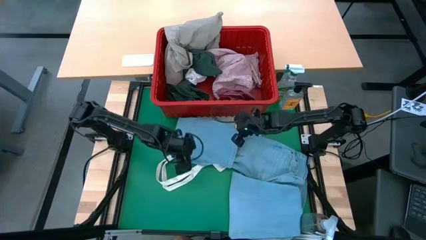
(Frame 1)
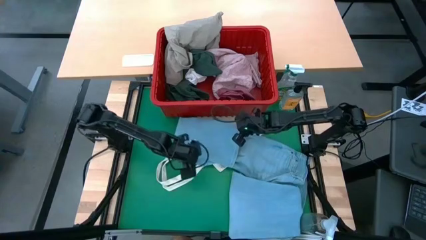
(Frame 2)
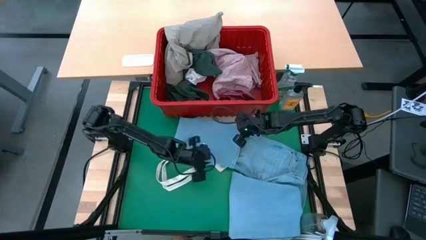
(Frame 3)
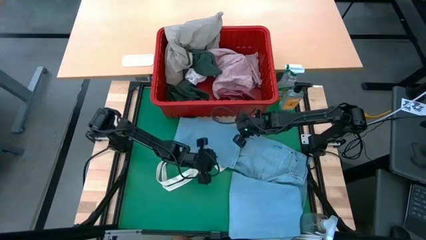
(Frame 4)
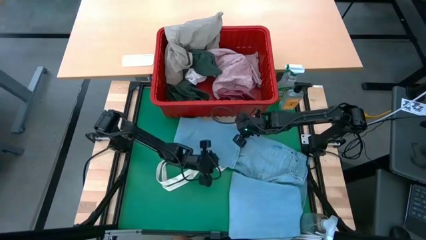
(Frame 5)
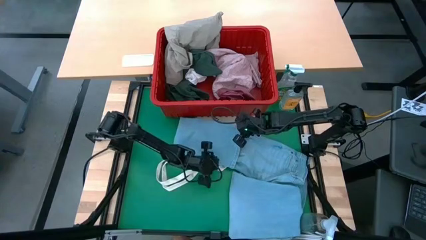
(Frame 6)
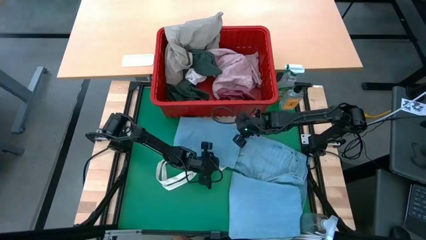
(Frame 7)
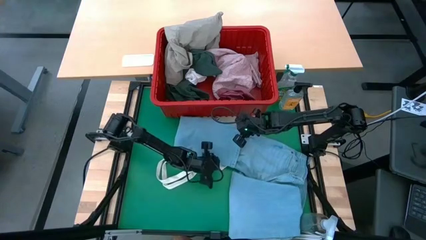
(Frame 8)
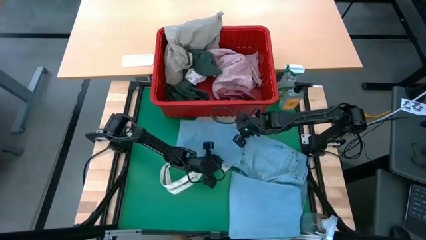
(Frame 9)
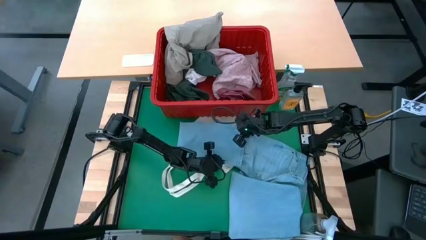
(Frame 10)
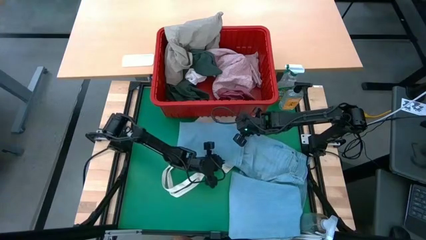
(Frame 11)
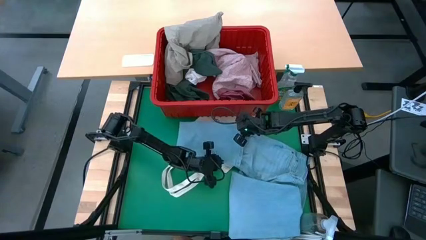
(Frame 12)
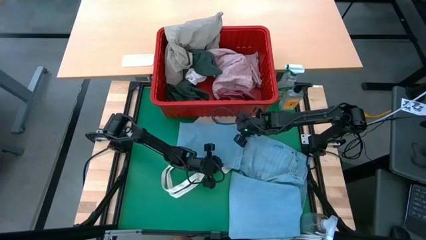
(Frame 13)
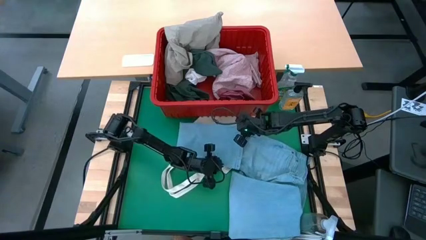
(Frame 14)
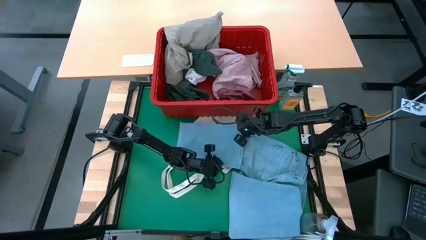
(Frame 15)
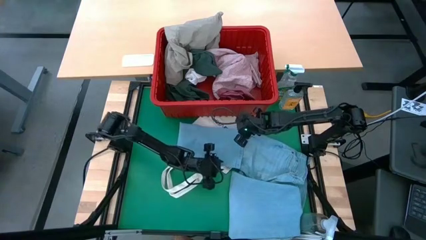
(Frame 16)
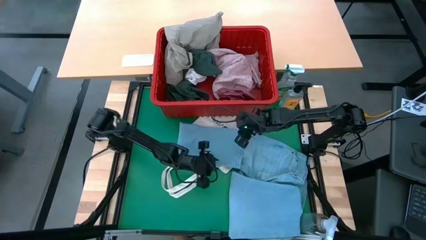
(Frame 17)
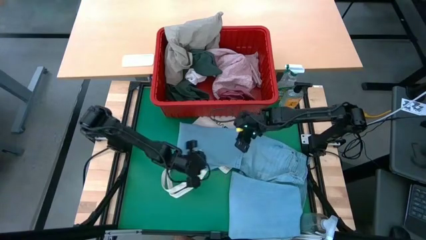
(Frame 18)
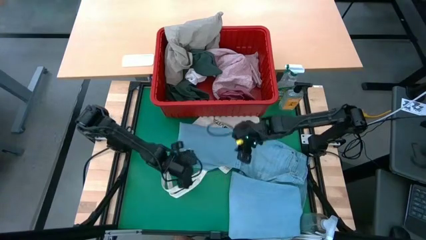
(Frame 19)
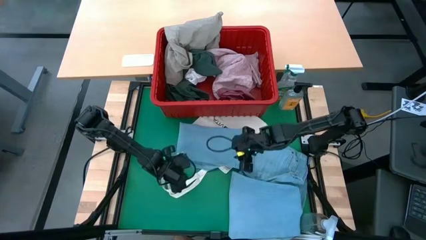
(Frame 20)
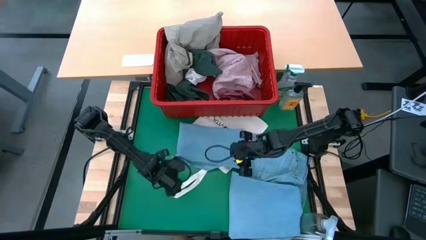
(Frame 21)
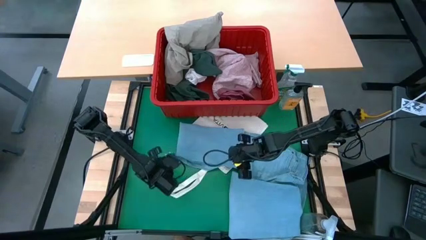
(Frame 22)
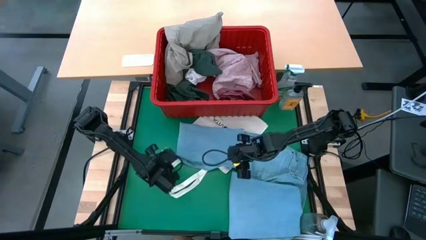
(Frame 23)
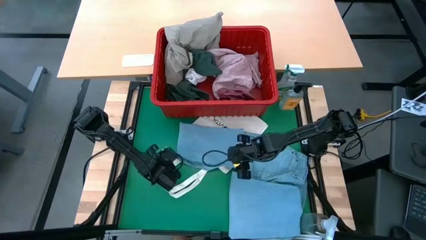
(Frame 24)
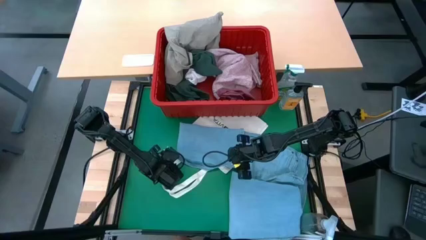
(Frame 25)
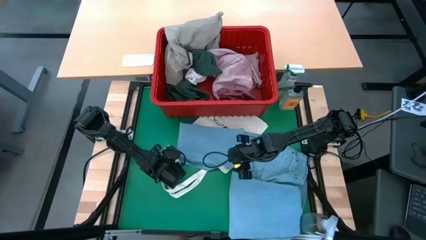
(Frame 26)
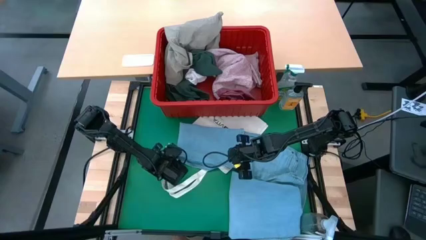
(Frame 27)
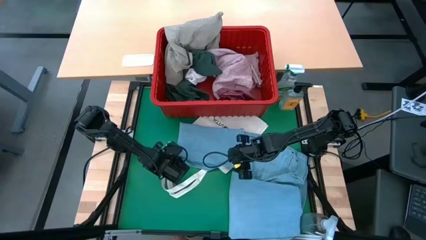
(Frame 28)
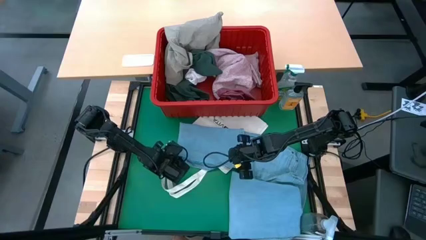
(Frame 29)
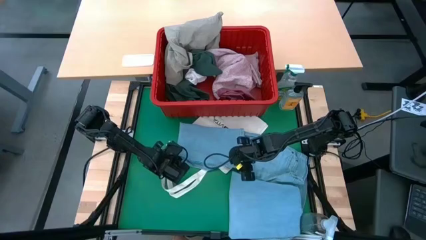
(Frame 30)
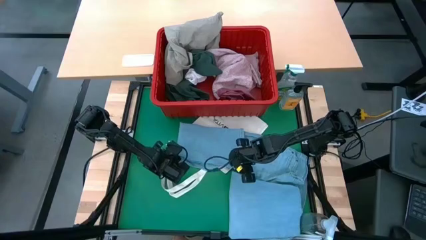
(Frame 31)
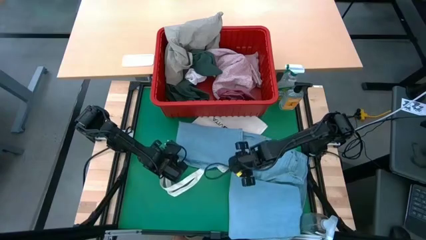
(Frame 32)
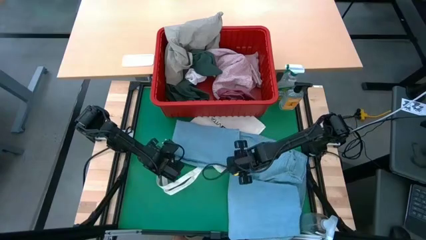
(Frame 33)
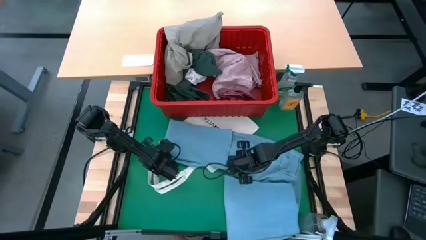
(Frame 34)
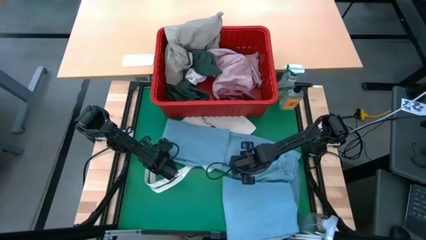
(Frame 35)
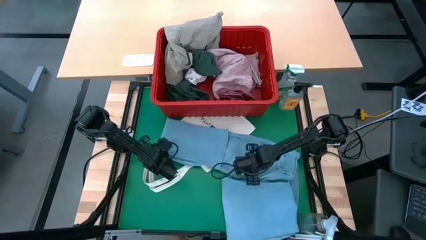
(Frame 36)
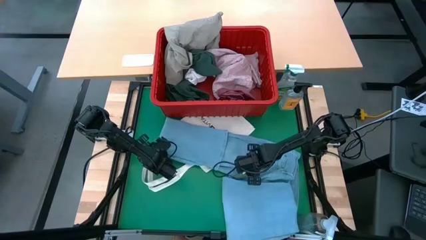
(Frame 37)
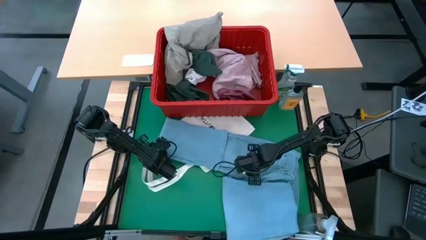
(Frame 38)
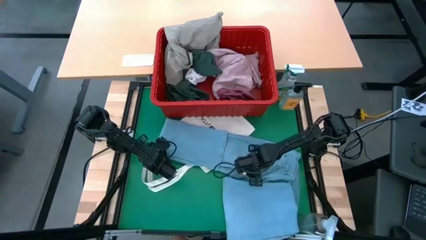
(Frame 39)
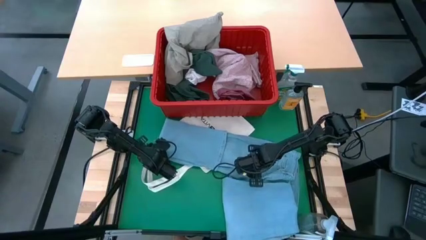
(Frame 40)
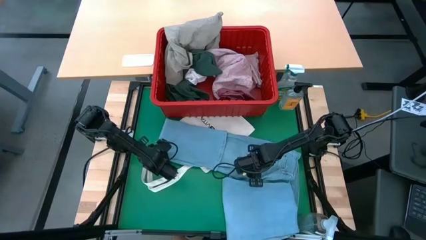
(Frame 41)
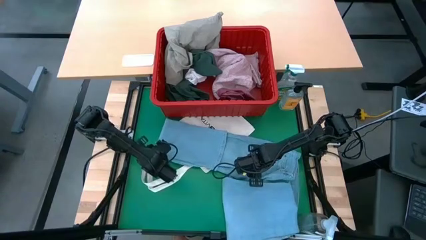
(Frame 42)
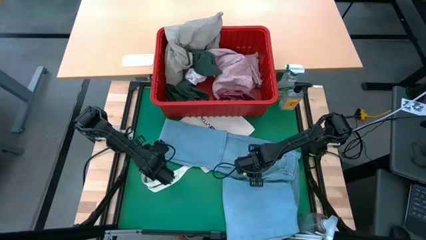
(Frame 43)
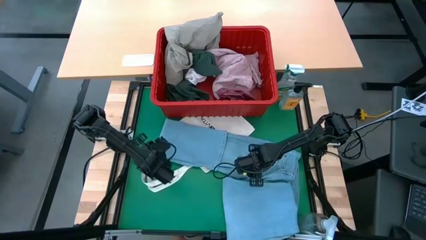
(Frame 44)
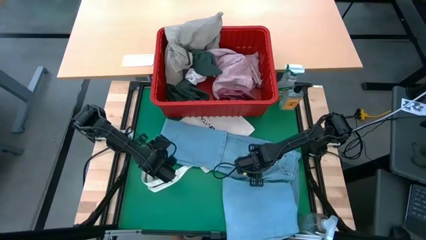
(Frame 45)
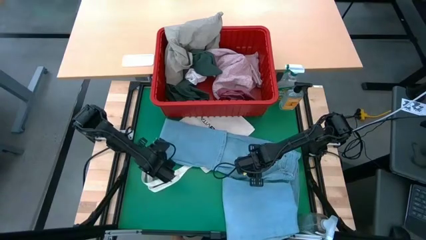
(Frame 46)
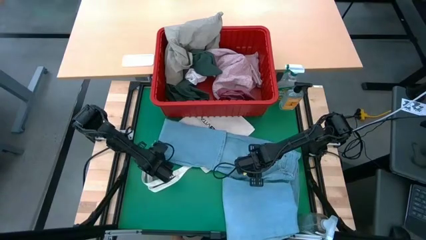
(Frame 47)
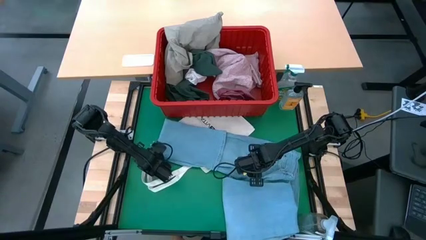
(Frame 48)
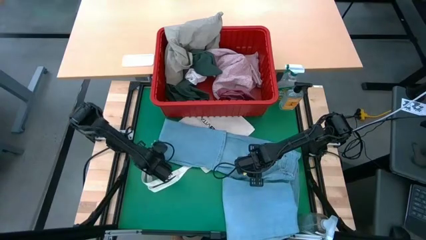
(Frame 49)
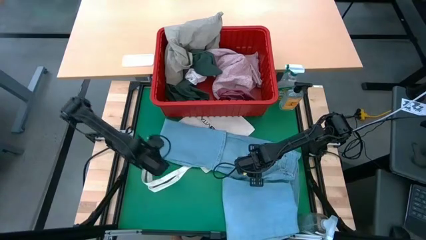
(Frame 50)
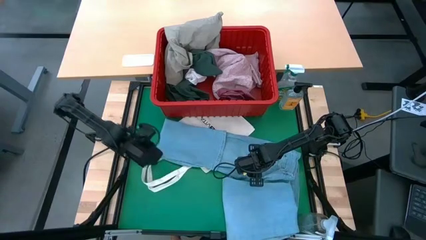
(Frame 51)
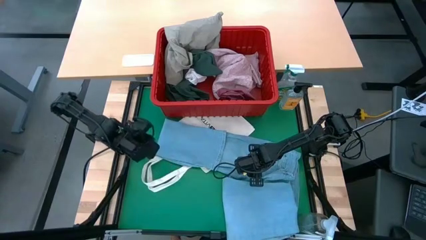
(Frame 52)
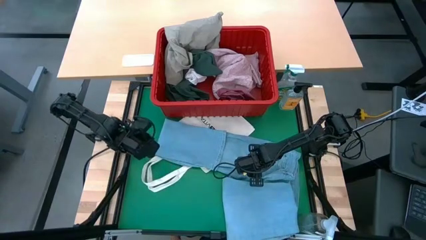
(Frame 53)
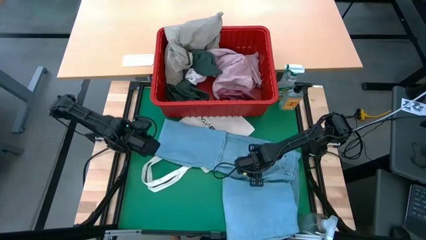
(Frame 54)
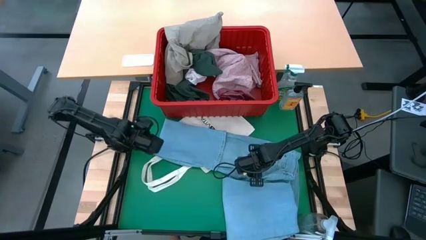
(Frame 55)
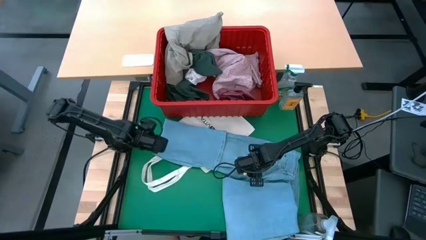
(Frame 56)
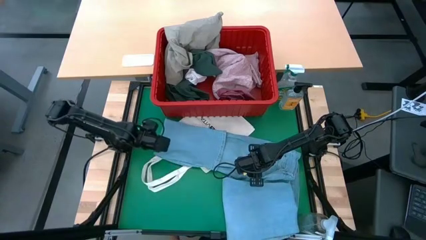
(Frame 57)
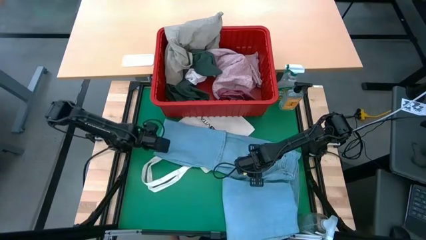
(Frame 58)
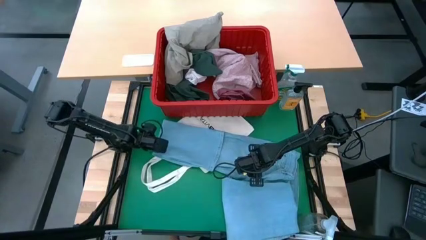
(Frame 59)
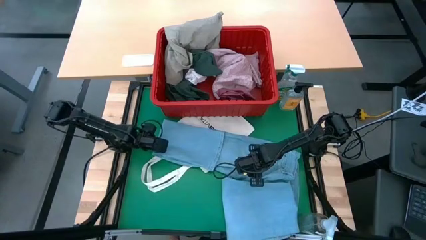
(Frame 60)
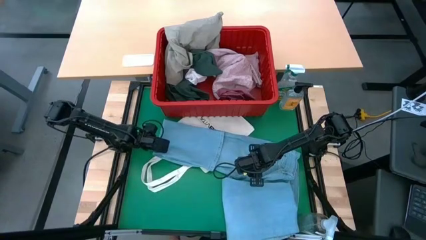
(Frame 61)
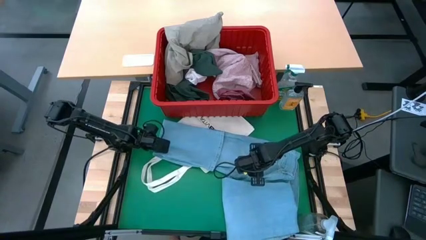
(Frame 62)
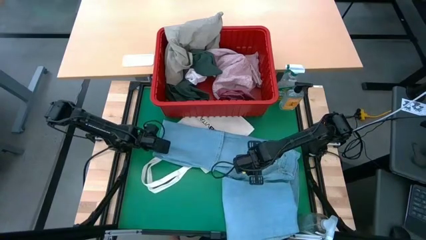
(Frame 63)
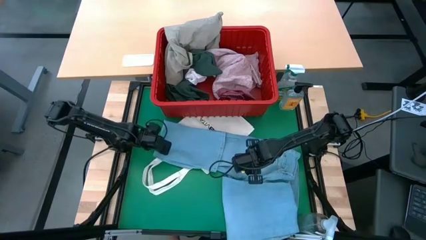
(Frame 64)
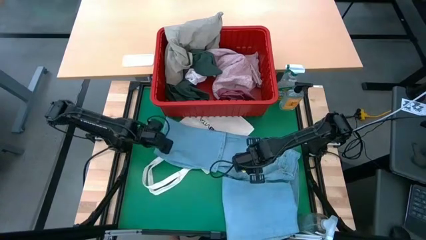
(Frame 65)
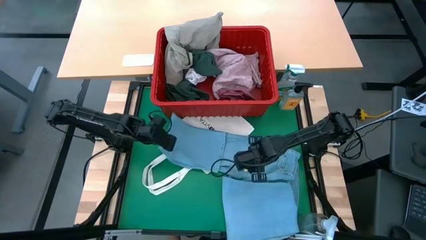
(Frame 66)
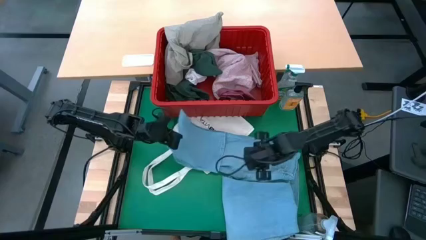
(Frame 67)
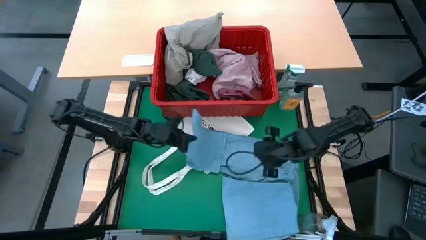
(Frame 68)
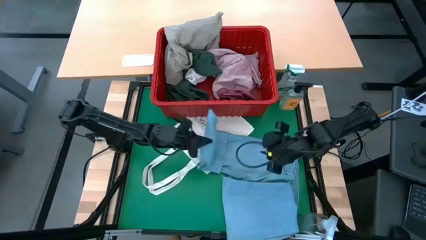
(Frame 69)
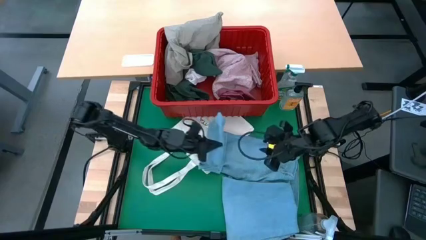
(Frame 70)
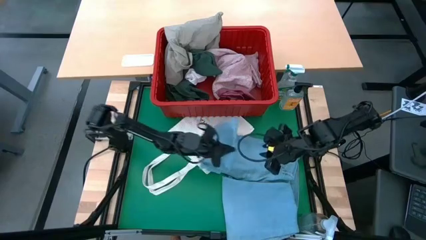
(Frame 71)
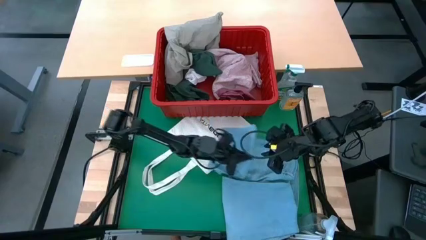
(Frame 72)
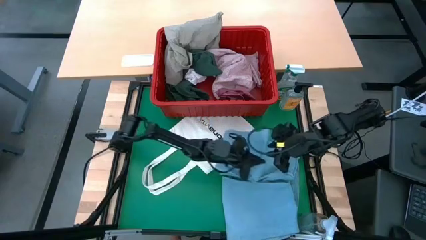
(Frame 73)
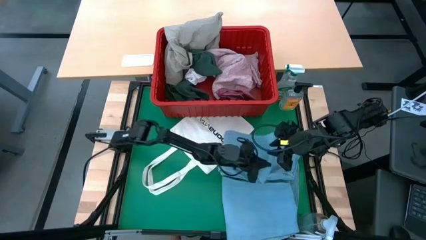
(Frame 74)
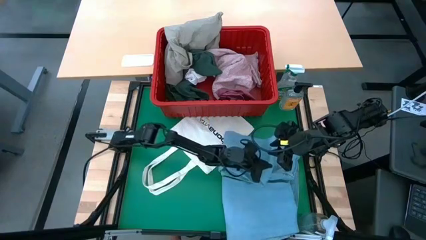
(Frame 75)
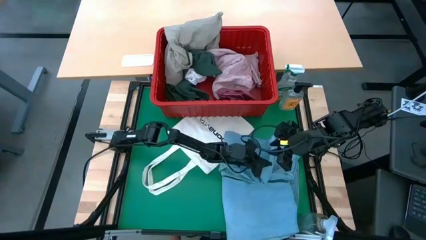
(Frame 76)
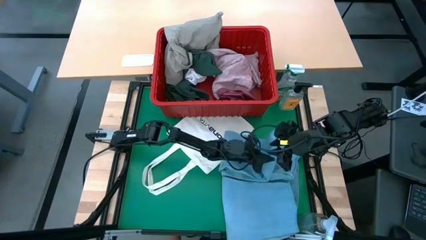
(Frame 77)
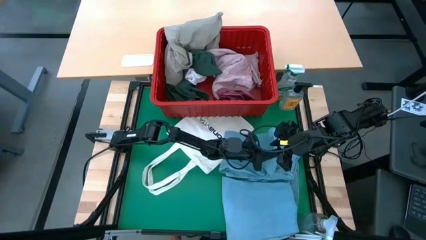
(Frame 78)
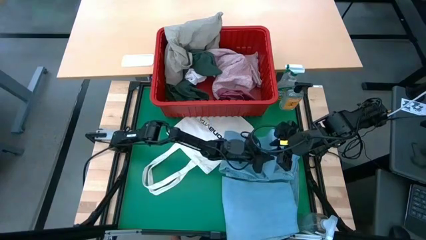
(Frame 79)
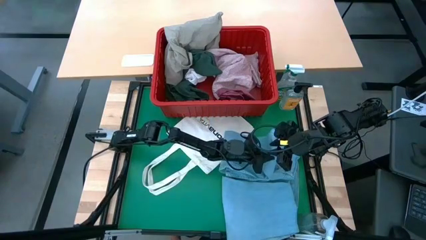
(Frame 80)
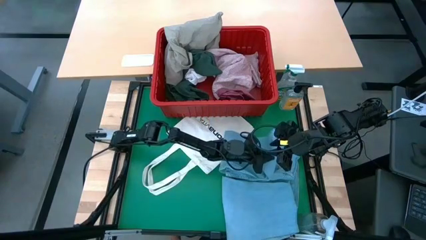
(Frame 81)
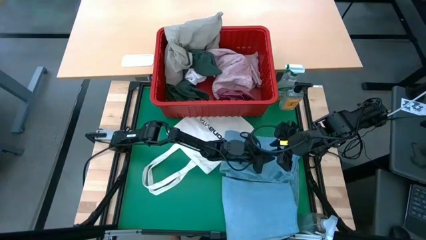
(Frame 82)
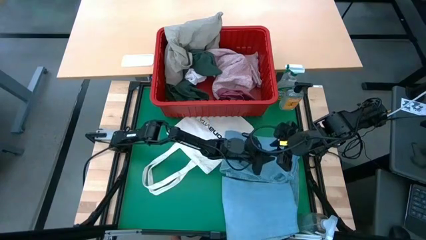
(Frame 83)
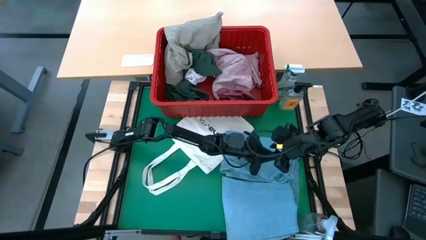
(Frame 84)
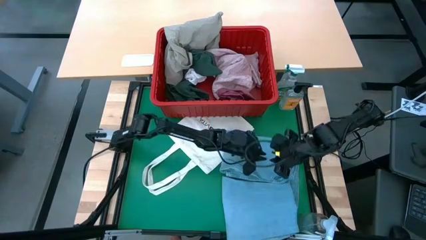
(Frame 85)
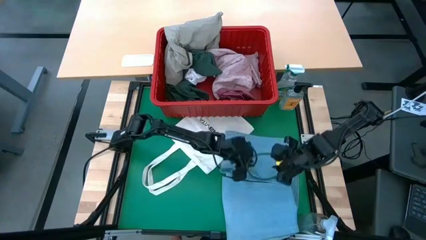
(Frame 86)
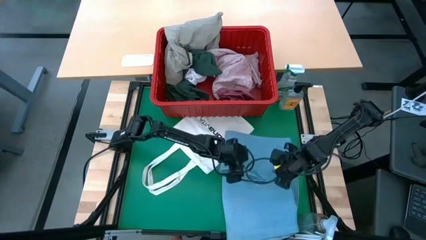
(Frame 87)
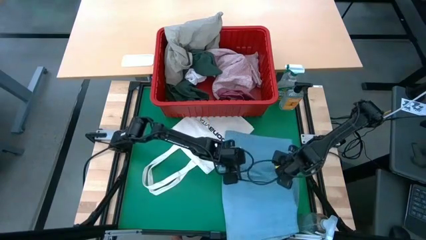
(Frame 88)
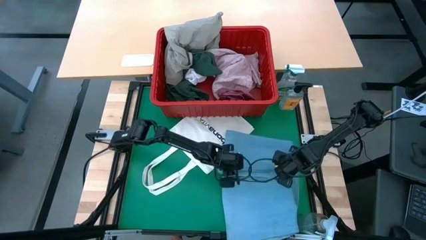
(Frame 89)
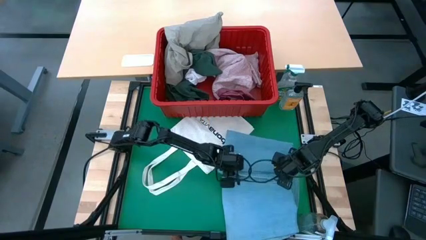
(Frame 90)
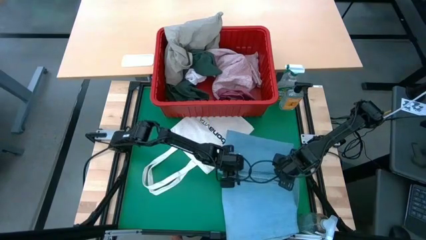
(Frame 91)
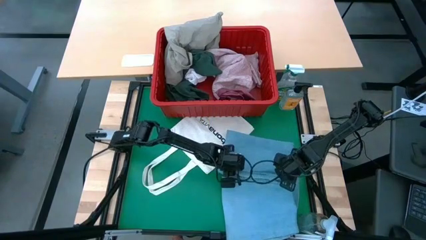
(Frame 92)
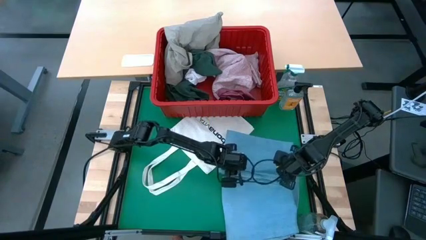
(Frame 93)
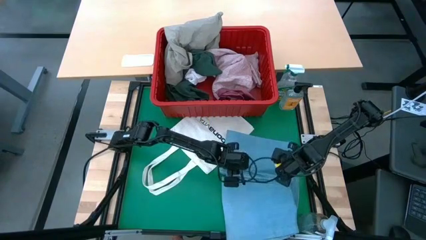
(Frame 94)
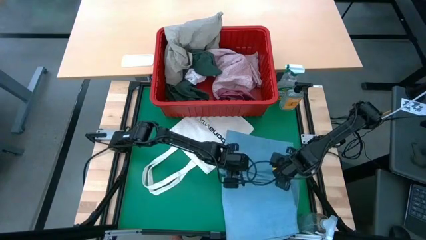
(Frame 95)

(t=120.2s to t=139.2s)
Task: Fold laundry
Fold the blue jeans
